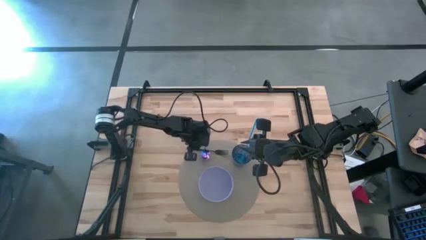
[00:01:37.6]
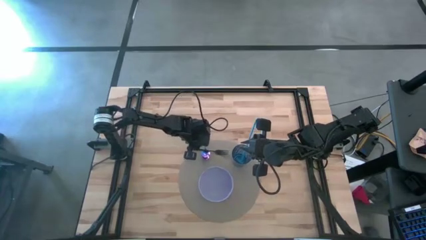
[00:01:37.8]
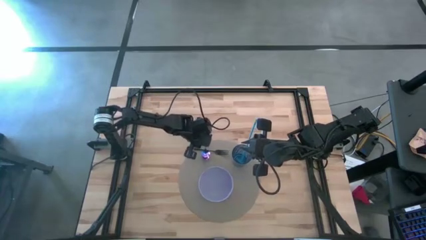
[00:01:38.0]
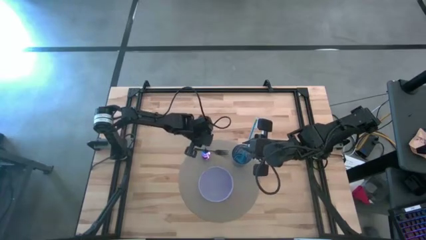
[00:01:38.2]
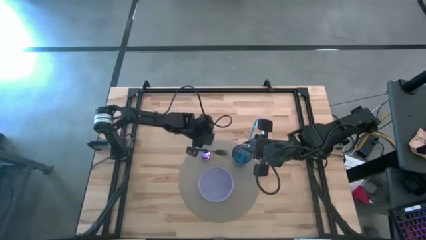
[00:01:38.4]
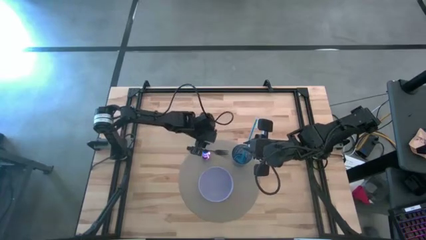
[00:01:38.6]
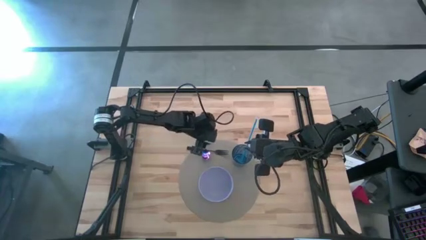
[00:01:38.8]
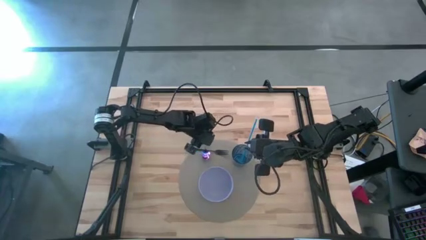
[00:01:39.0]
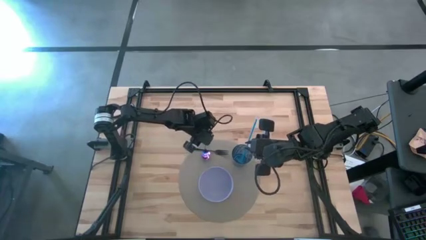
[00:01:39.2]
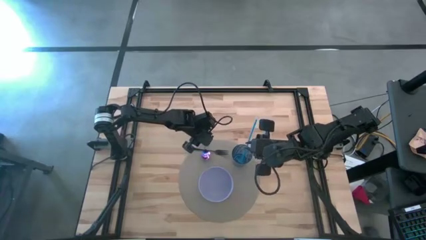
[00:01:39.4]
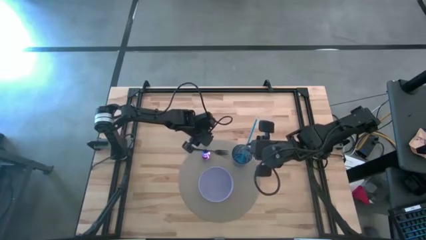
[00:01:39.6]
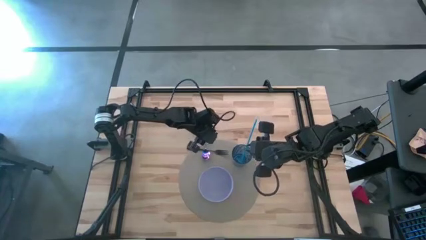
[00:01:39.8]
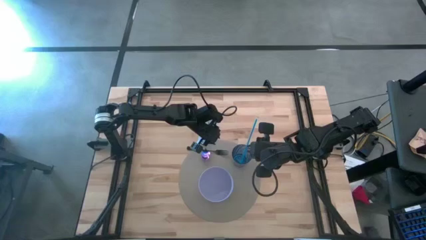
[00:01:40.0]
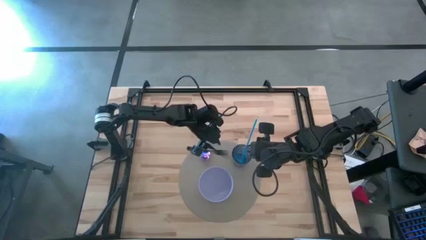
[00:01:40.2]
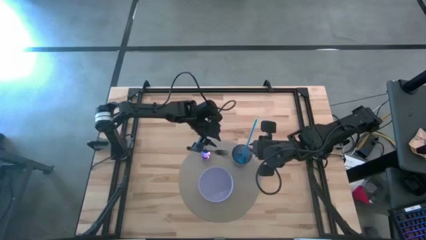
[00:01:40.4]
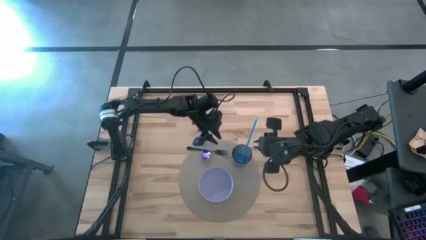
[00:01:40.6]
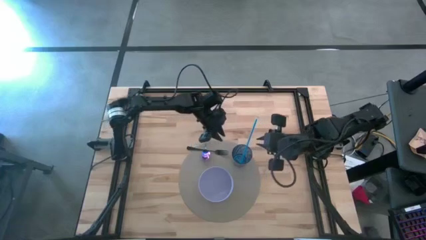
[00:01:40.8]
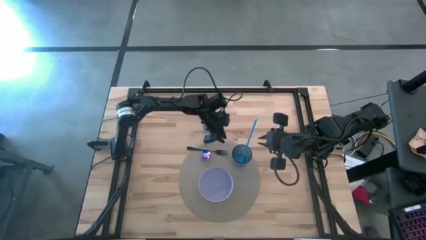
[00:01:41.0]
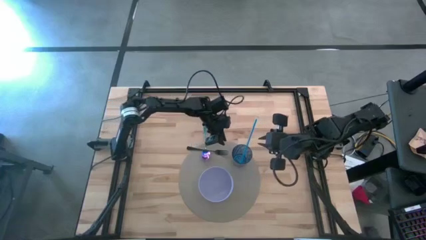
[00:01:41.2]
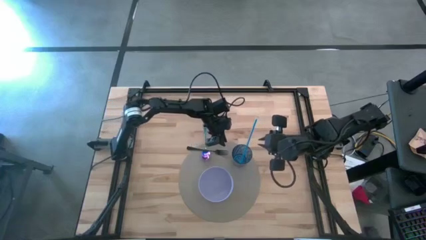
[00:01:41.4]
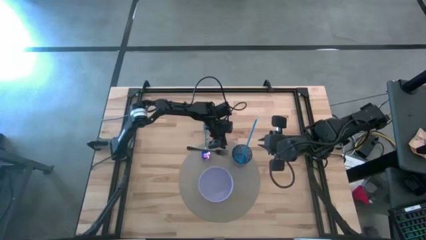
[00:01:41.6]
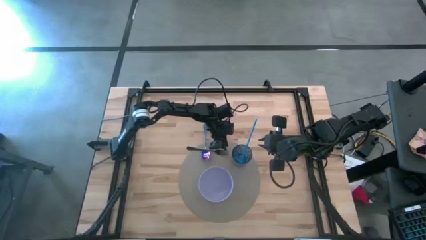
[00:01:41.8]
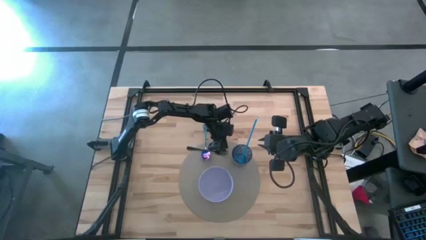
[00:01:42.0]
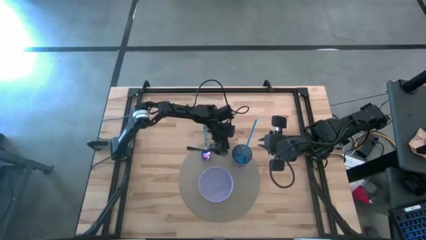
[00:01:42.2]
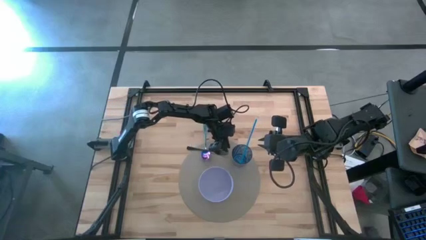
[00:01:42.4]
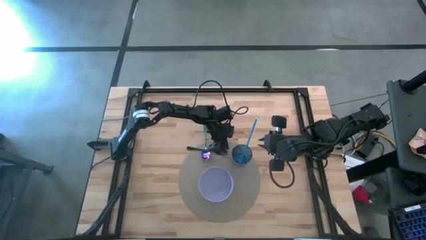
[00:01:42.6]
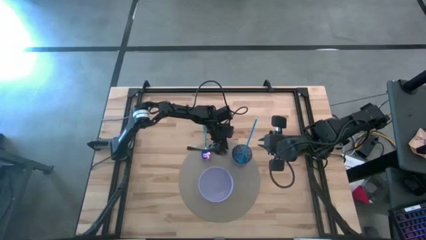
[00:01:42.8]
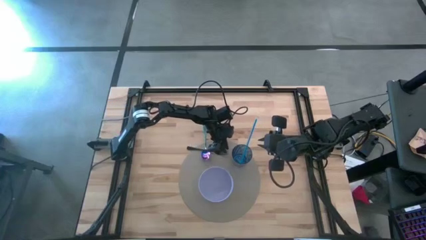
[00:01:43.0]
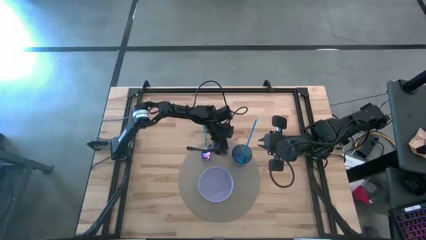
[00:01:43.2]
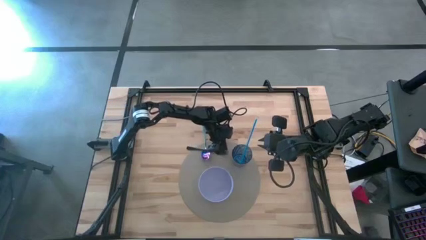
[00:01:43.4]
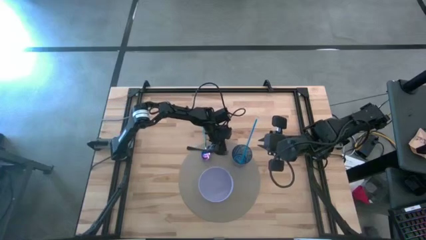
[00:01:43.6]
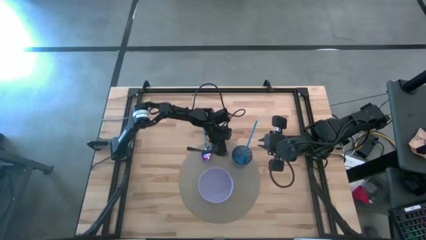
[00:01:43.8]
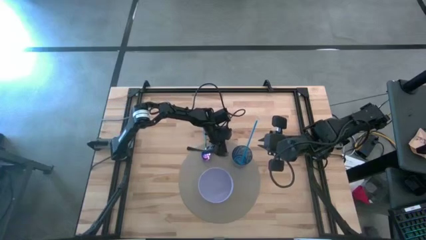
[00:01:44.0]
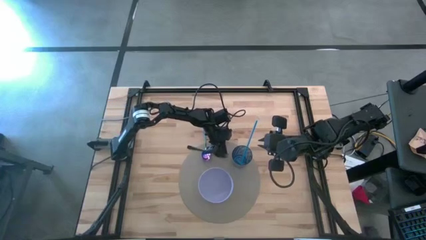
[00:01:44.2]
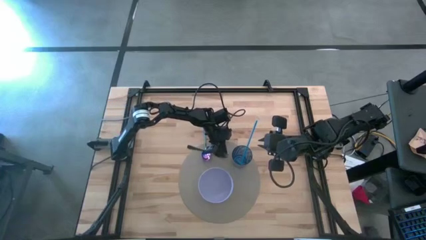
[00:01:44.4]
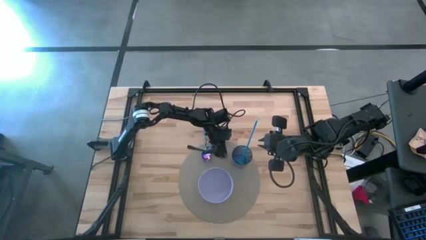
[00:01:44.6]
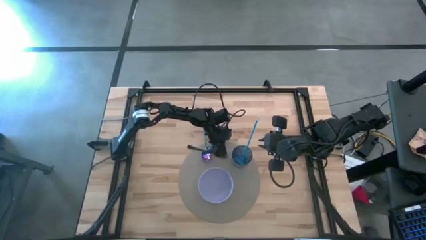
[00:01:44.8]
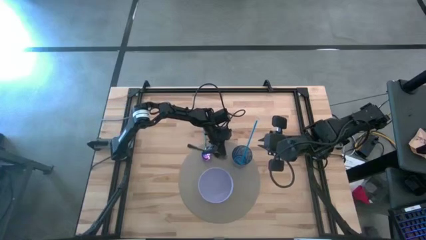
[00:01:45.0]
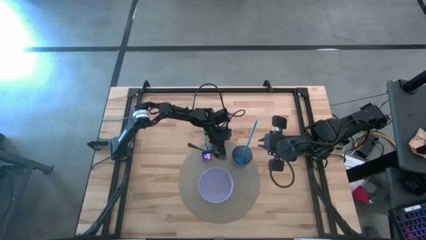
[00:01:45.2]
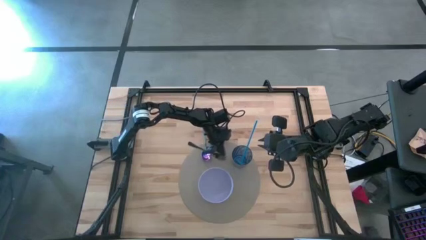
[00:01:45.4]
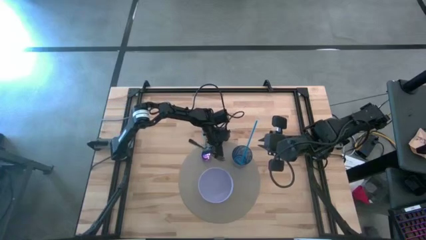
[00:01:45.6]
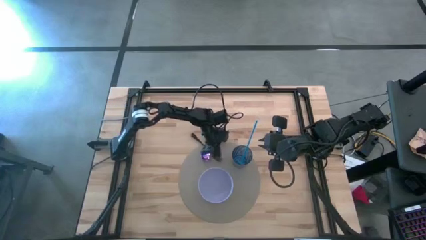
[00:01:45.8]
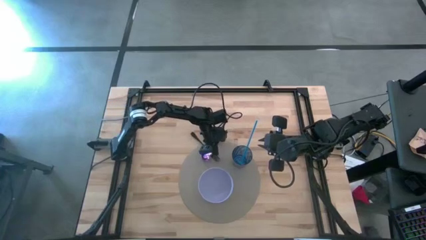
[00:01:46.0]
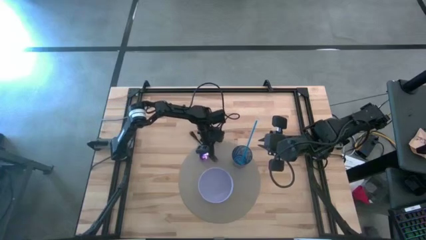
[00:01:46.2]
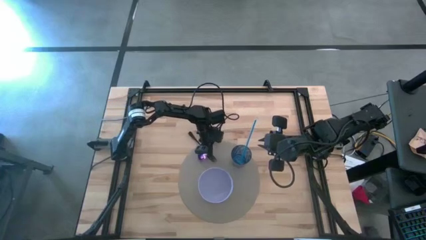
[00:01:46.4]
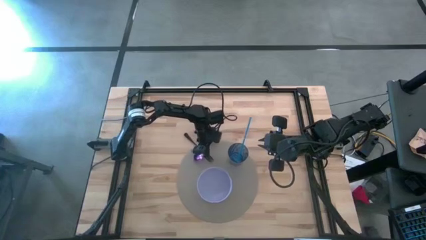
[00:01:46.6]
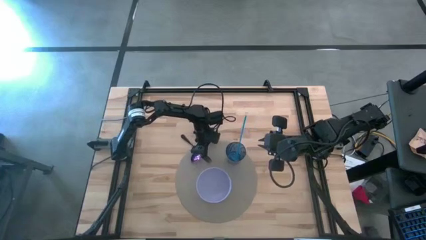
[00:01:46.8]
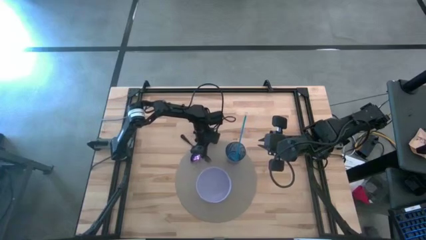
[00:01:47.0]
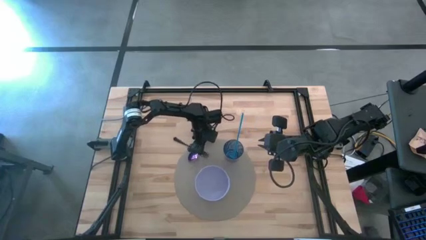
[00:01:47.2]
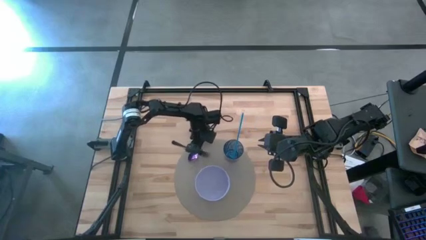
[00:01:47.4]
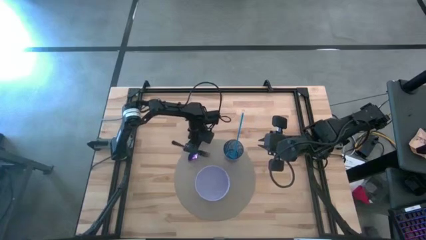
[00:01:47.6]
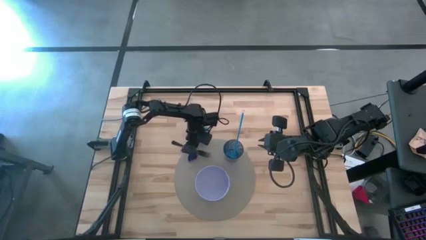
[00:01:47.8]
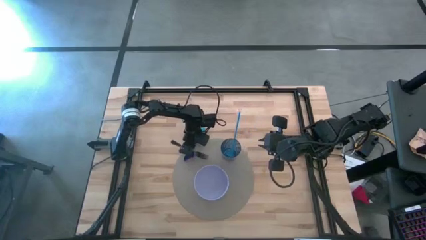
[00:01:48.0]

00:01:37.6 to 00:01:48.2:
Task: Pick & Place Utensil
Put the fork into the bowl

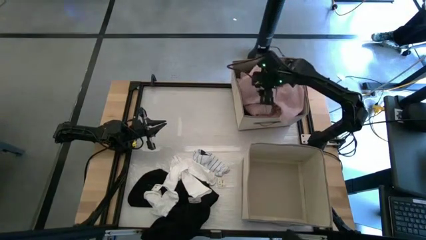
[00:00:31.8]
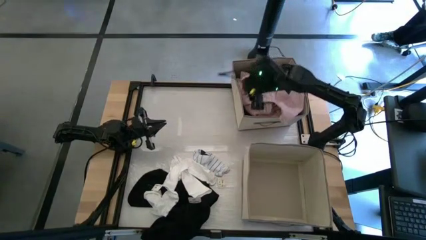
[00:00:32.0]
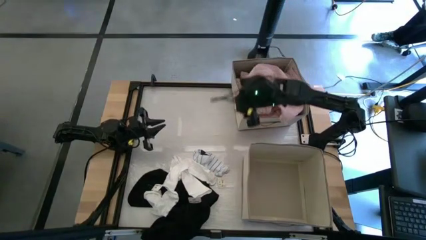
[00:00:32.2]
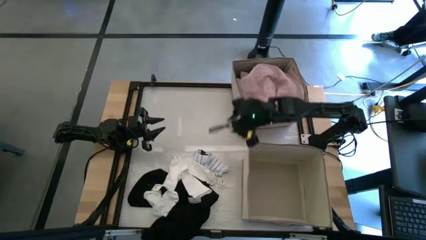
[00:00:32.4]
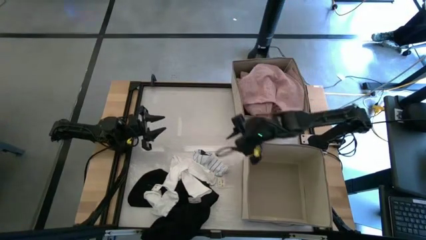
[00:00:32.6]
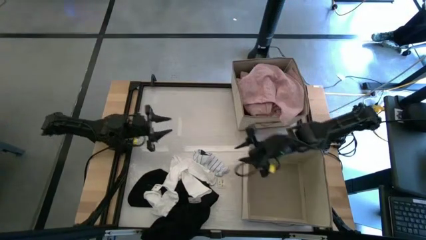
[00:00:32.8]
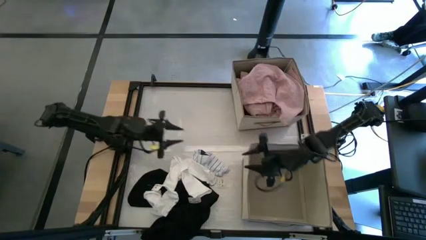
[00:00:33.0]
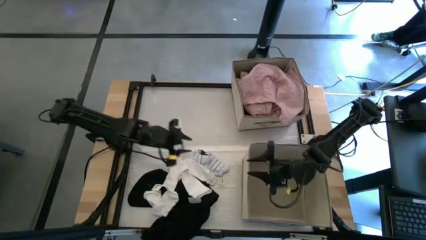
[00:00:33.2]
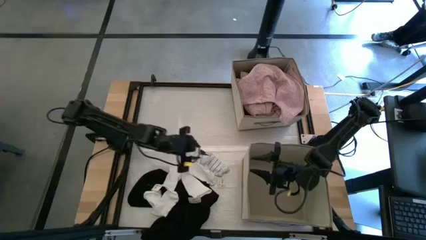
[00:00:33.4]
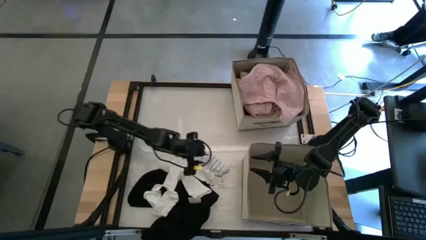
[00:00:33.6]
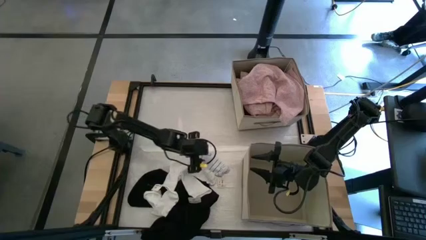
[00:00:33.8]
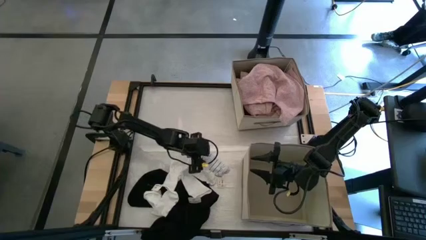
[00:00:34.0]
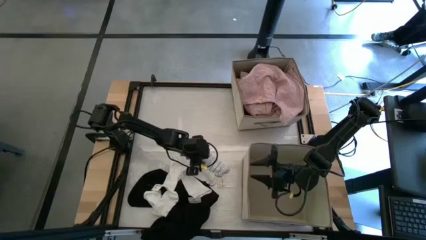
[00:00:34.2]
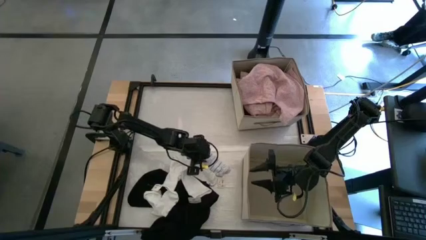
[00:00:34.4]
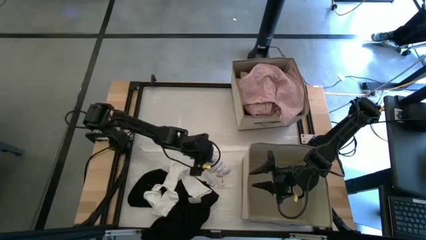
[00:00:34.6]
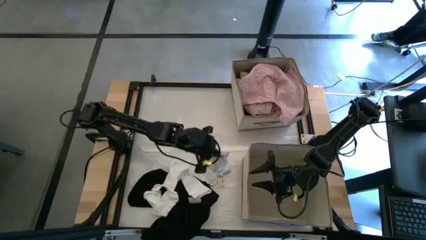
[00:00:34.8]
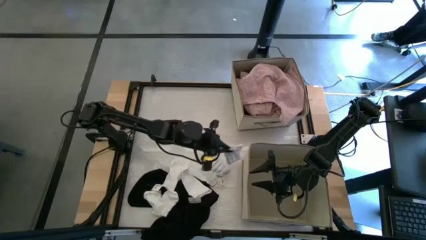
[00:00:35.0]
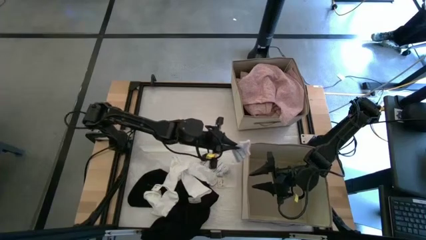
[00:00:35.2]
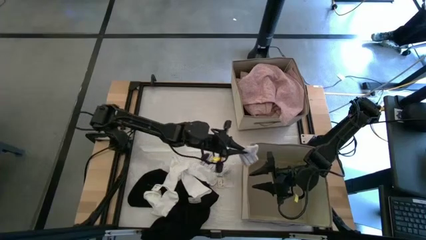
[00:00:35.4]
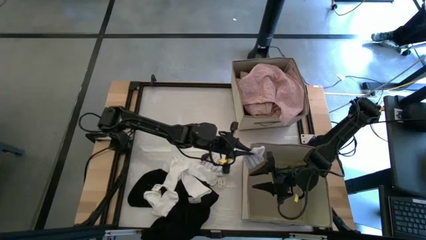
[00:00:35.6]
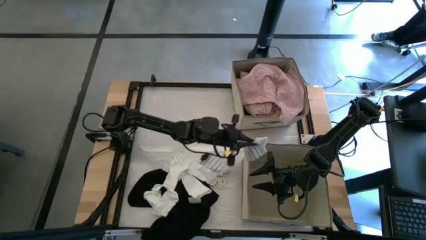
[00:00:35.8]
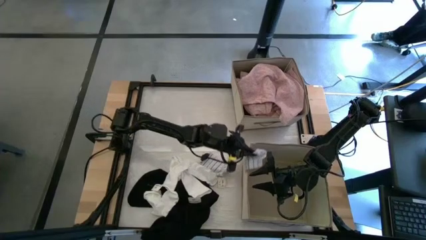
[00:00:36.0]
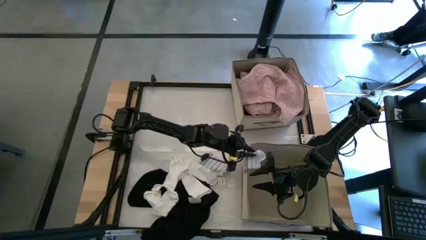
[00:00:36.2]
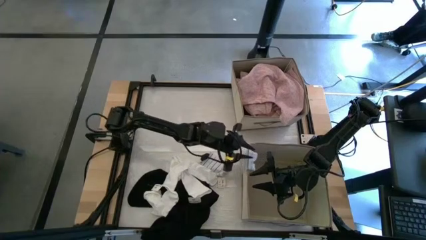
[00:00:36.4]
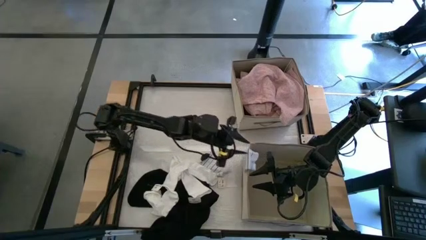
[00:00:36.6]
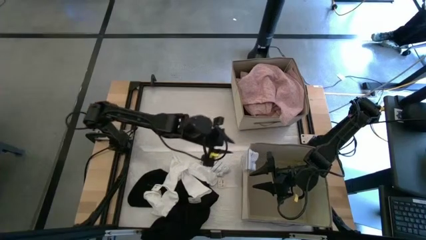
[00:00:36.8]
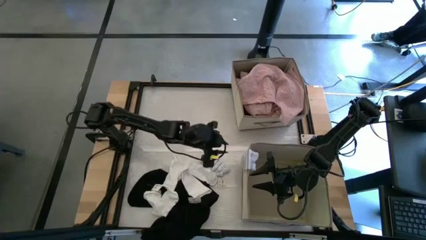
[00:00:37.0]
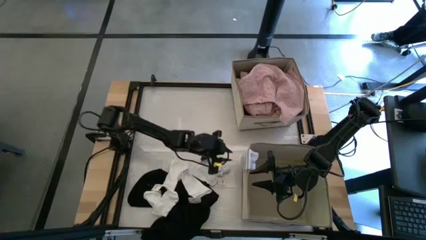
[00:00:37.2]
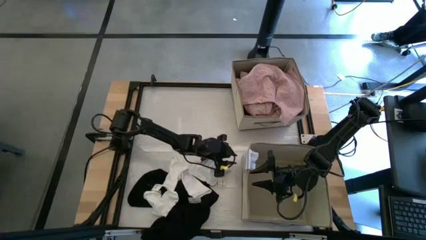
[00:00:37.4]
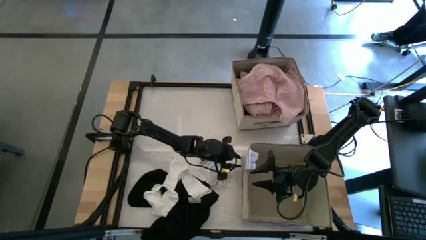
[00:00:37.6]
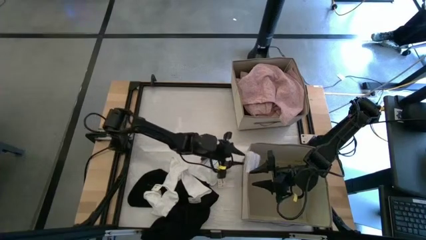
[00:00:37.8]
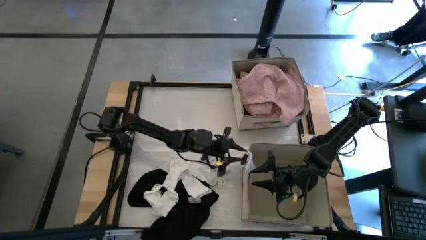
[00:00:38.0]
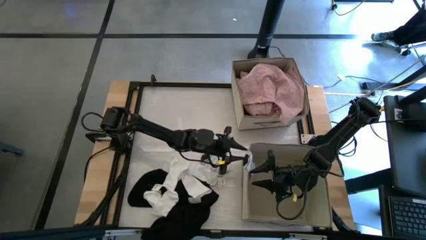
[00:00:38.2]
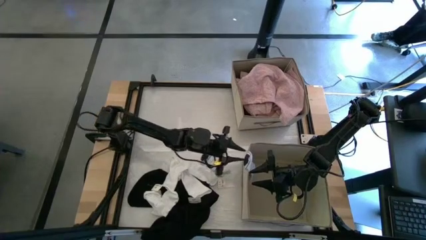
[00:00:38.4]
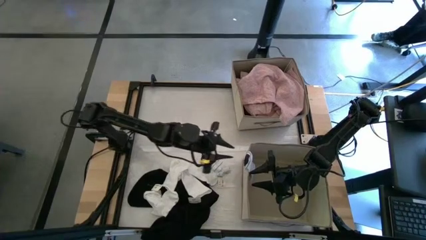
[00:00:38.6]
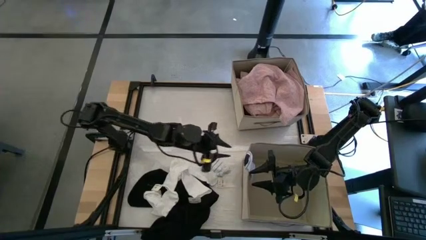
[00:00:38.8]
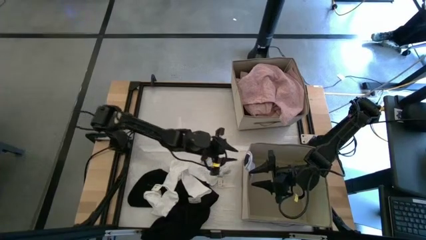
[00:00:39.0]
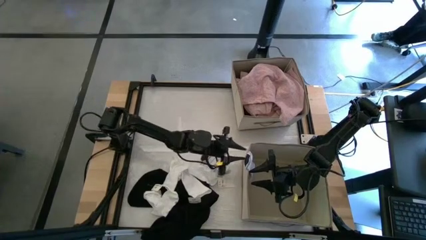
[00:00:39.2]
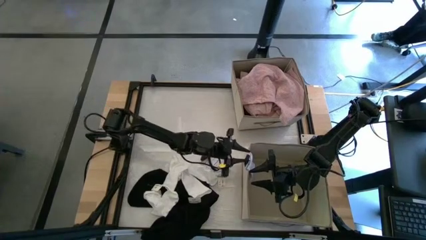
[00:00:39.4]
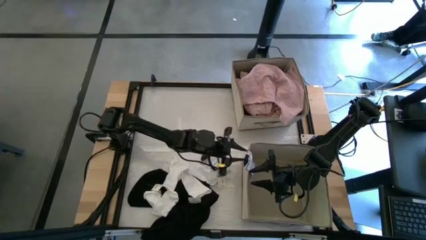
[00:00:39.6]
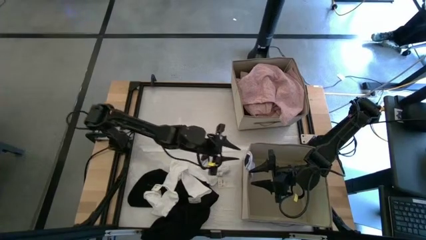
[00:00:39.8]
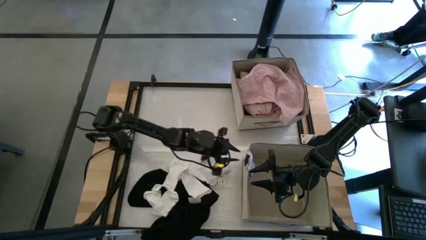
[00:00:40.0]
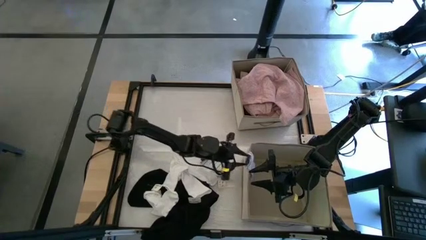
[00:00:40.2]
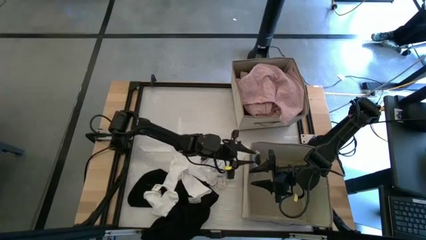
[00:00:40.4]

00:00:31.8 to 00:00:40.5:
Task: Sort clothes
Put the white striped sock into the bottom laundry organizer
